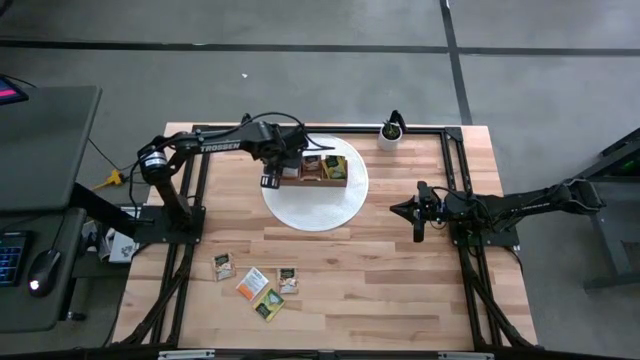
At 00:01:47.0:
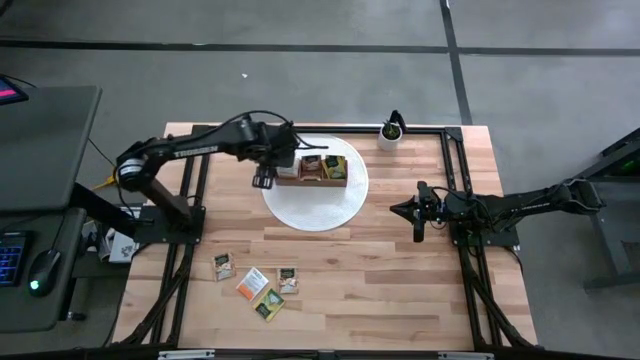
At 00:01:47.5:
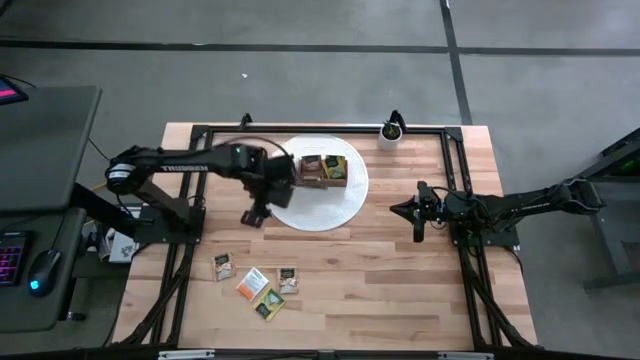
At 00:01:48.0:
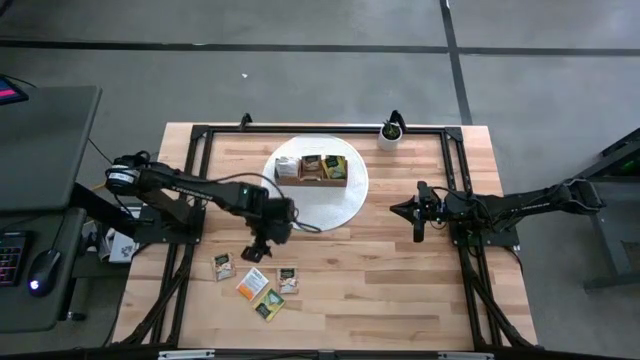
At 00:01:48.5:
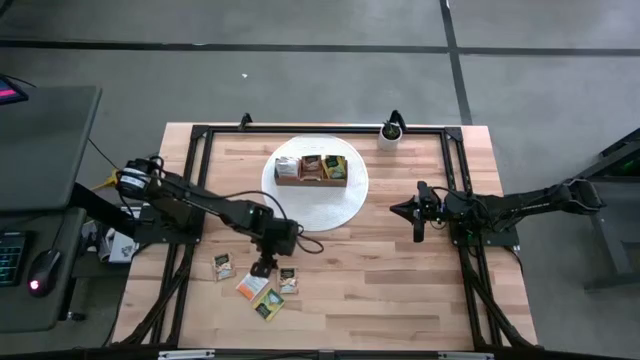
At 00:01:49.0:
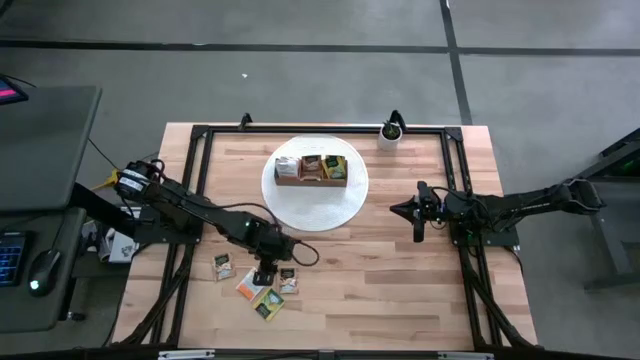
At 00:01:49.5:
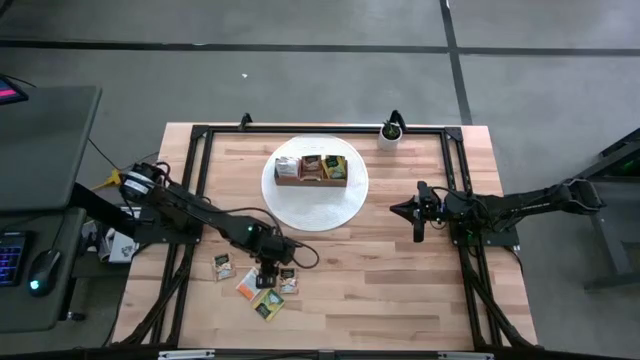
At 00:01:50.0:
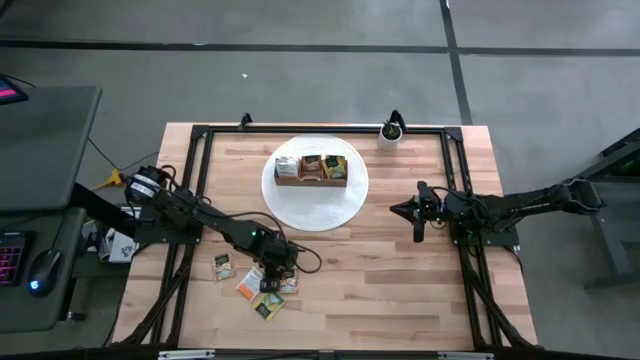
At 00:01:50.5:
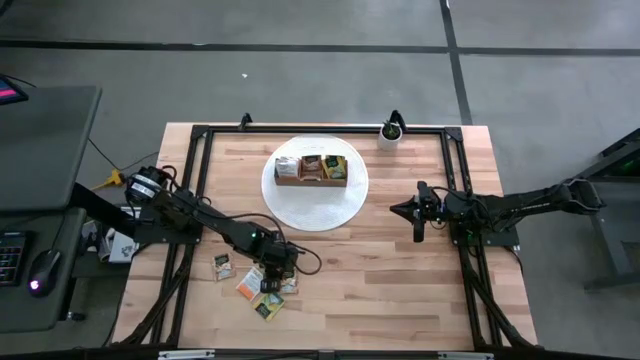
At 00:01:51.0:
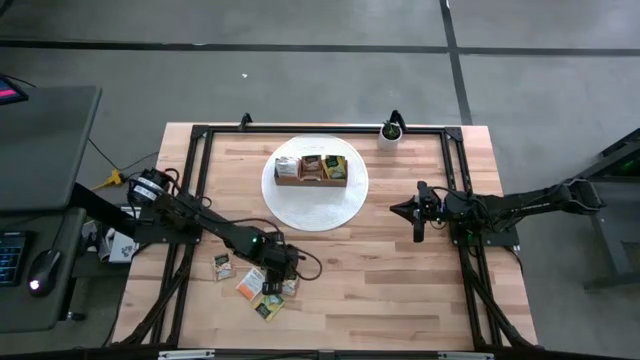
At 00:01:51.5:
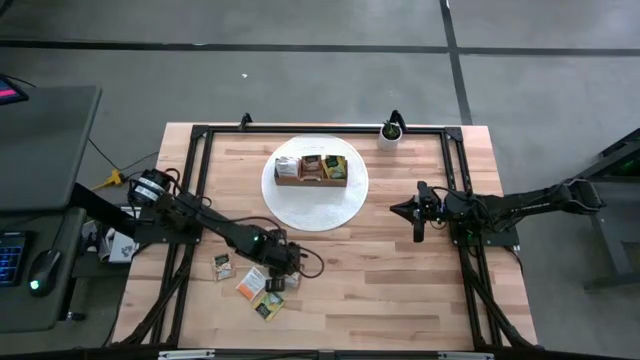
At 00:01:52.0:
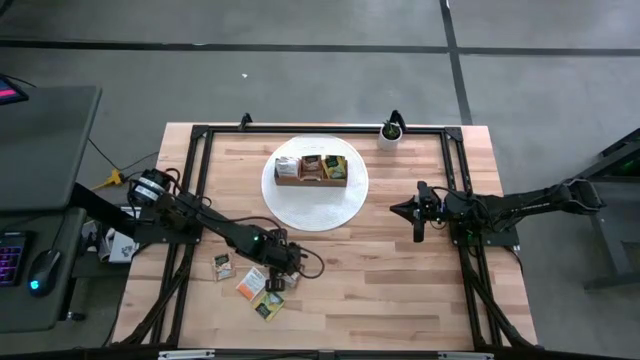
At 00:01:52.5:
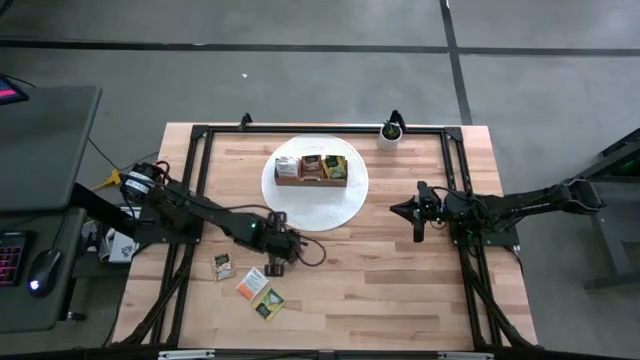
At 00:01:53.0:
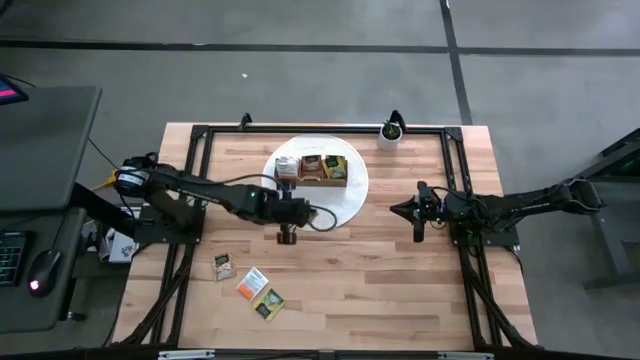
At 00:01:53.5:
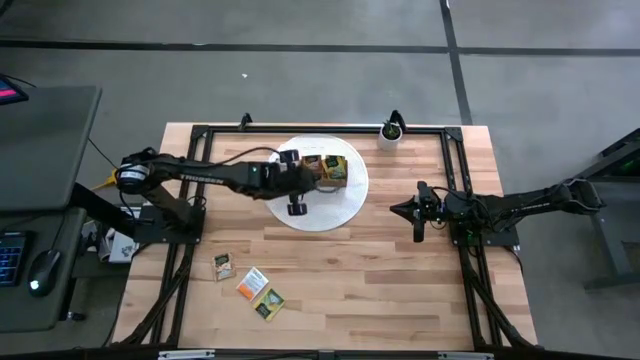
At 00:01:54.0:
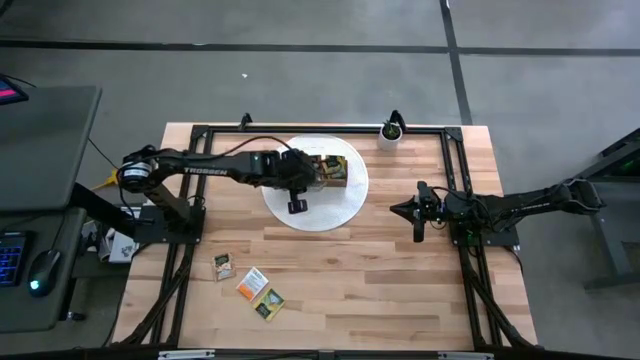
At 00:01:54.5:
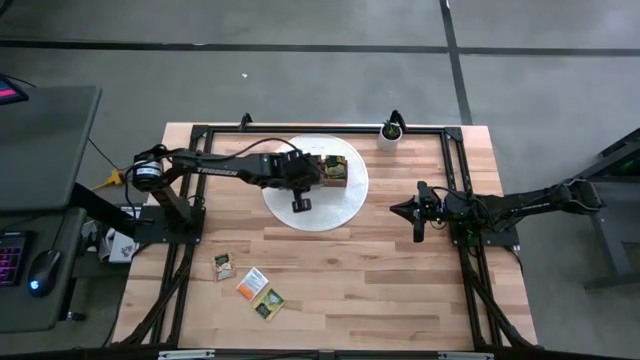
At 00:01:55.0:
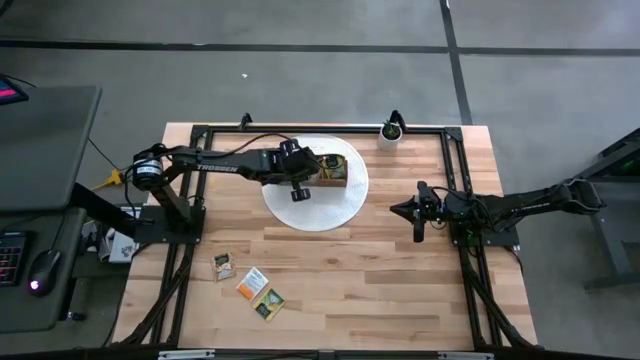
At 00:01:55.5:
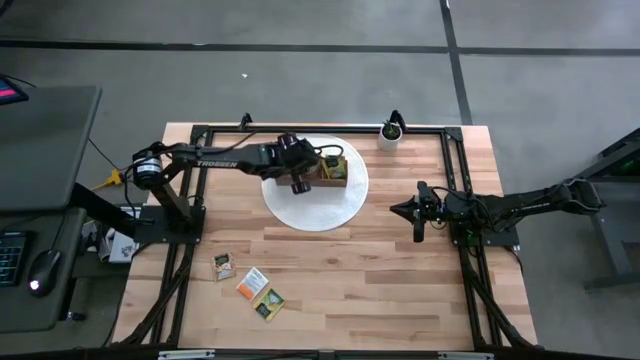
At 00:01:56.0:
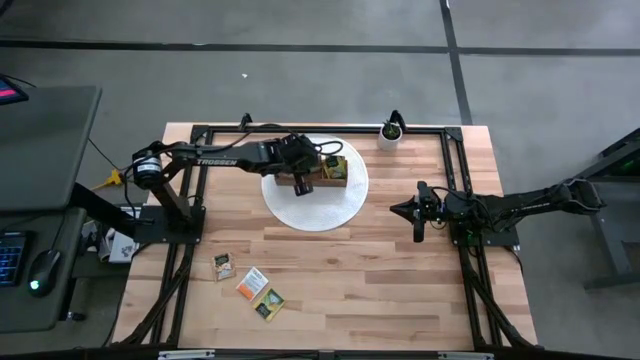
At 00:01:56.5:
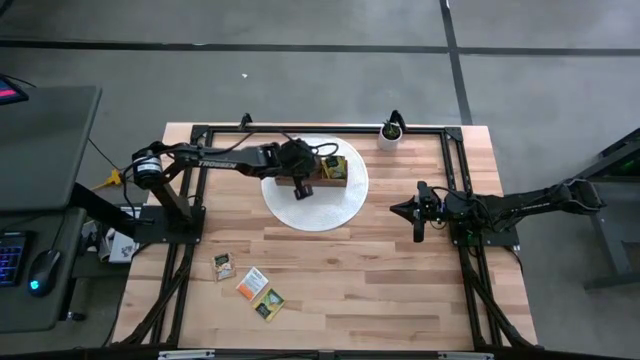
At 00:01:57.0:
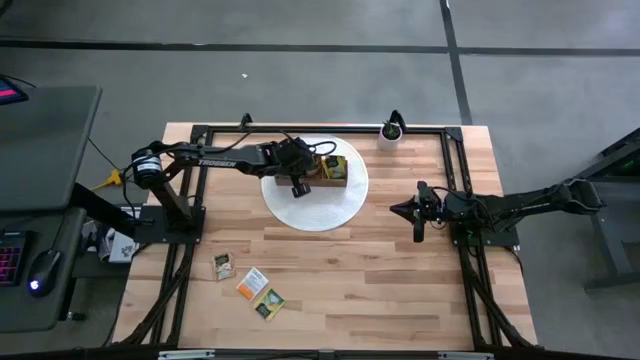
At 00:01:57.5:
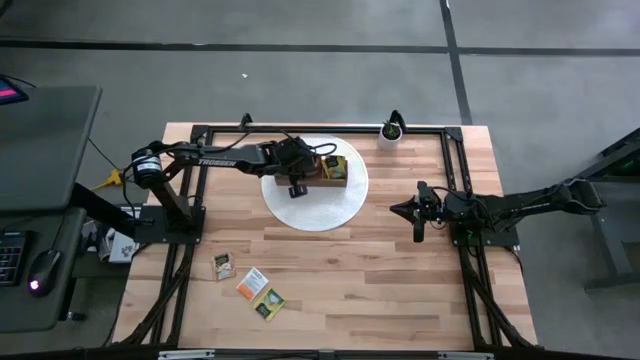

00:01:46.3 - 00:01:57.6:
Task: Pick & Place Tea
Put the brown tea bag into the middle section of the wooden organizer

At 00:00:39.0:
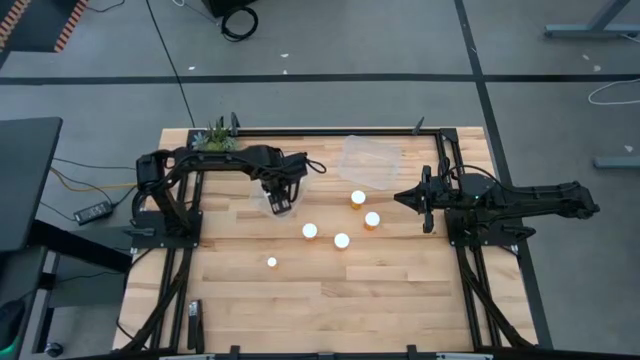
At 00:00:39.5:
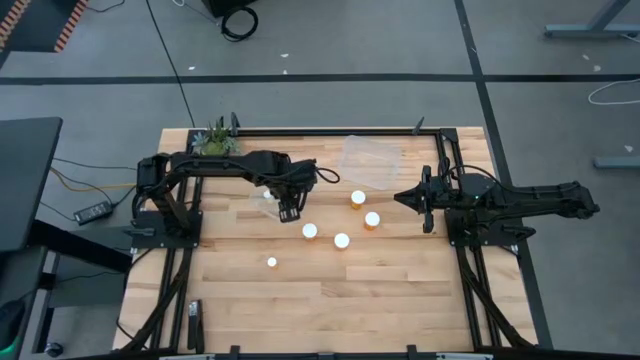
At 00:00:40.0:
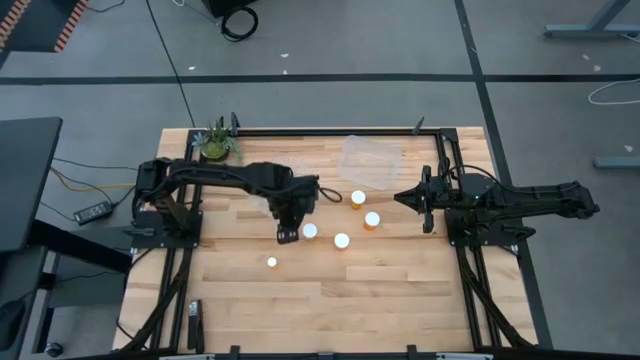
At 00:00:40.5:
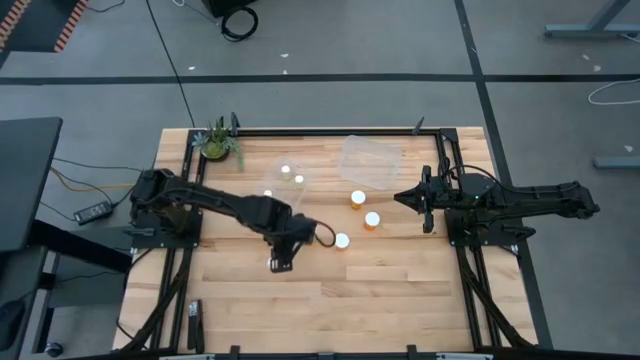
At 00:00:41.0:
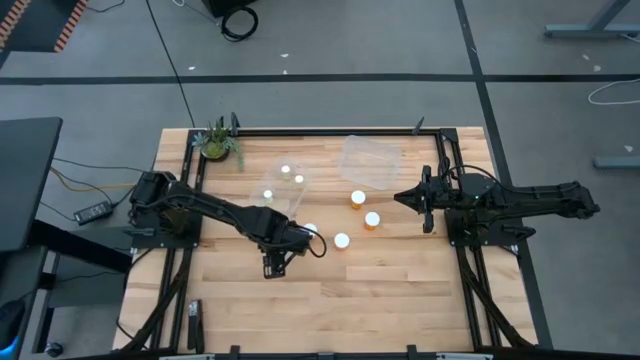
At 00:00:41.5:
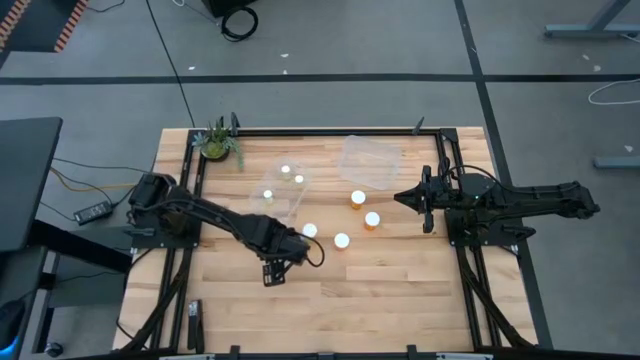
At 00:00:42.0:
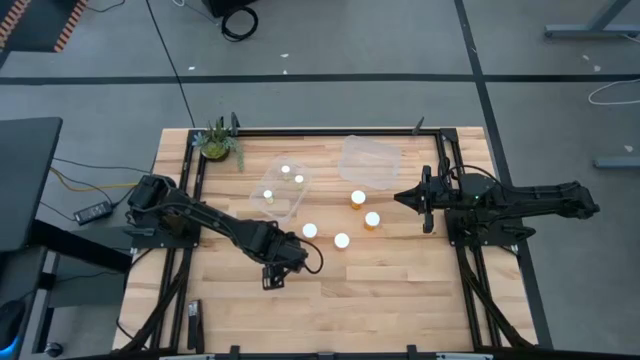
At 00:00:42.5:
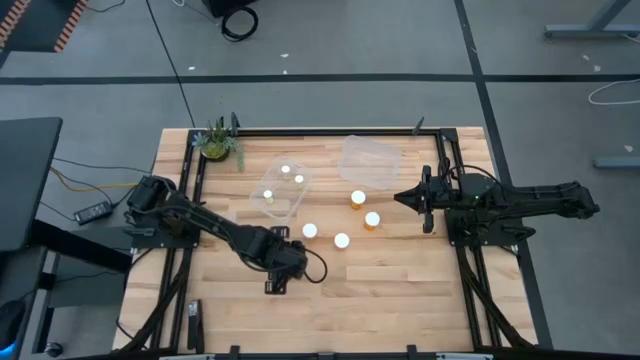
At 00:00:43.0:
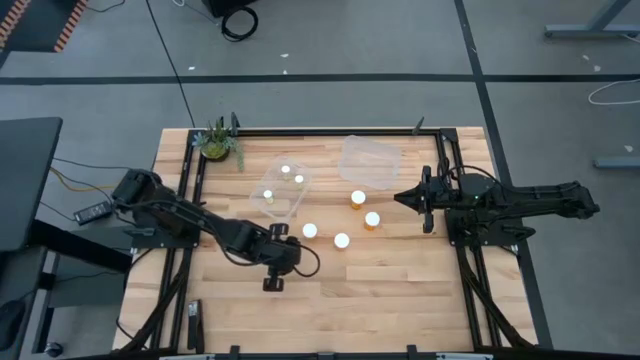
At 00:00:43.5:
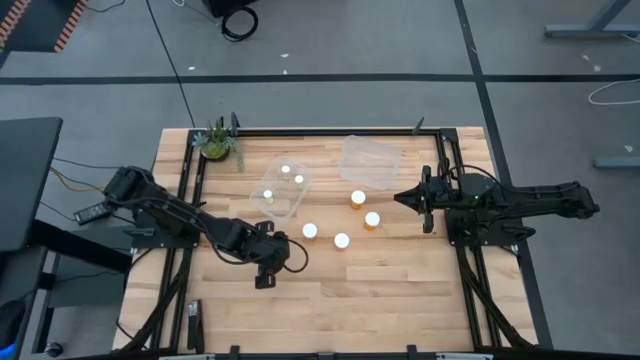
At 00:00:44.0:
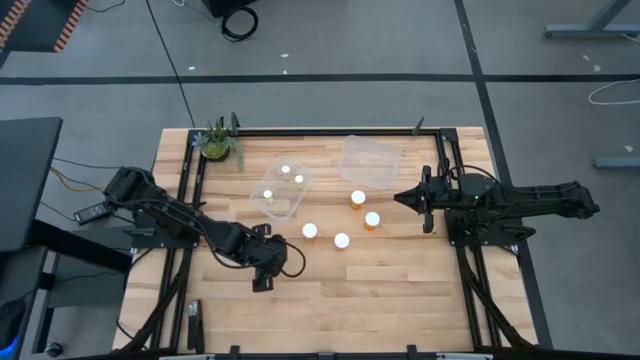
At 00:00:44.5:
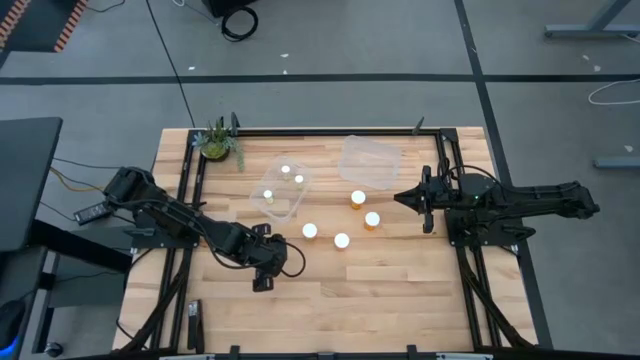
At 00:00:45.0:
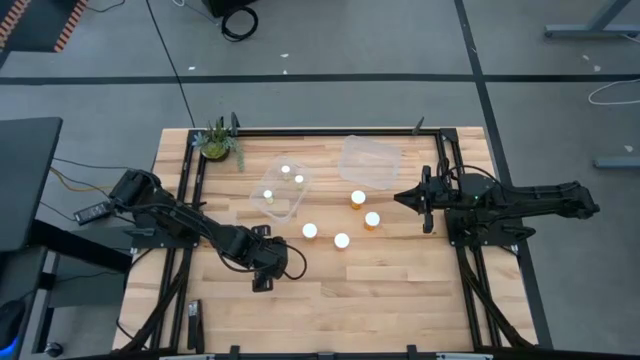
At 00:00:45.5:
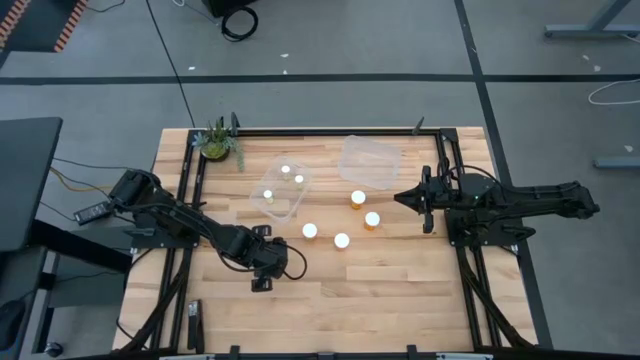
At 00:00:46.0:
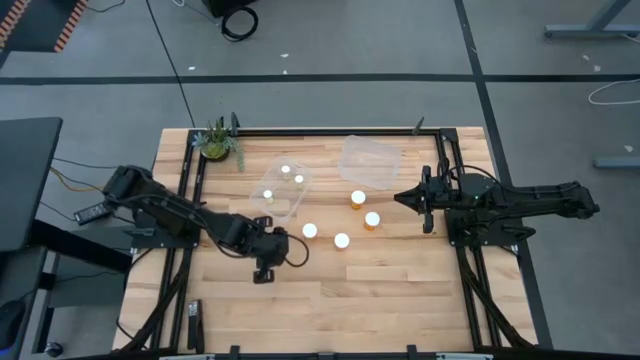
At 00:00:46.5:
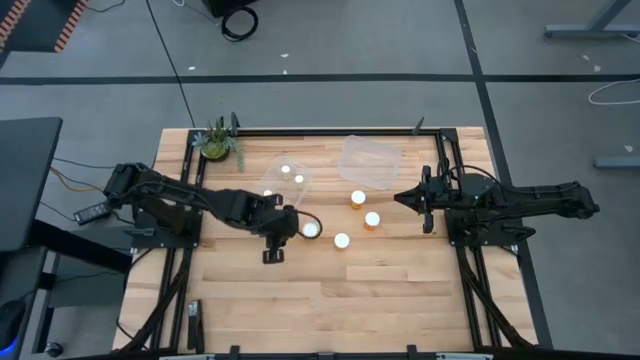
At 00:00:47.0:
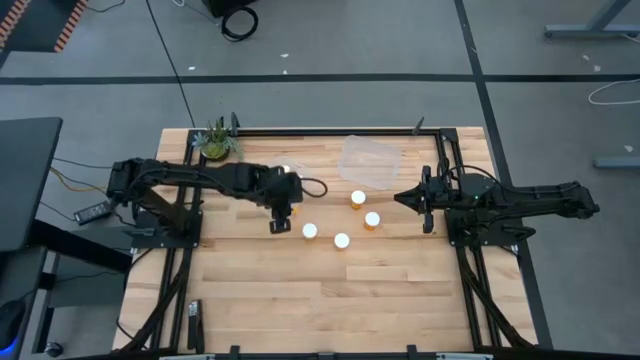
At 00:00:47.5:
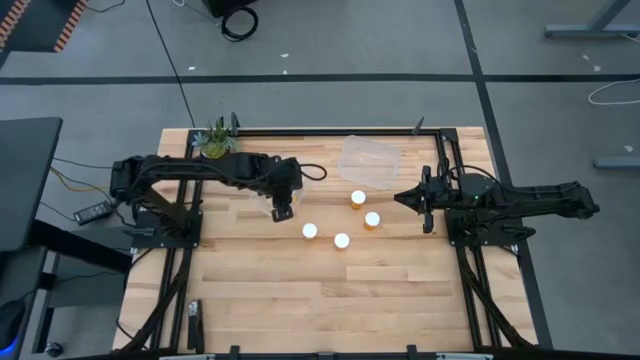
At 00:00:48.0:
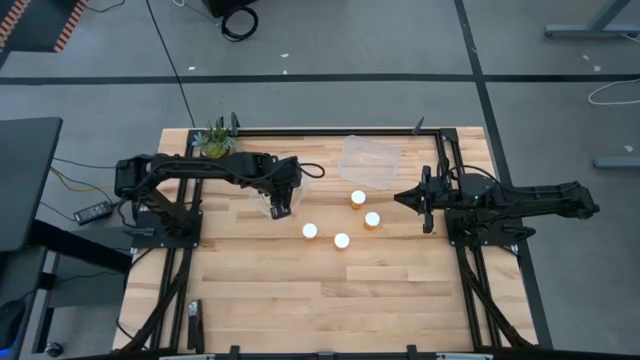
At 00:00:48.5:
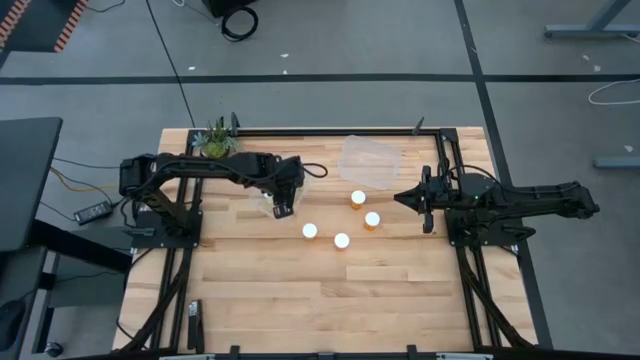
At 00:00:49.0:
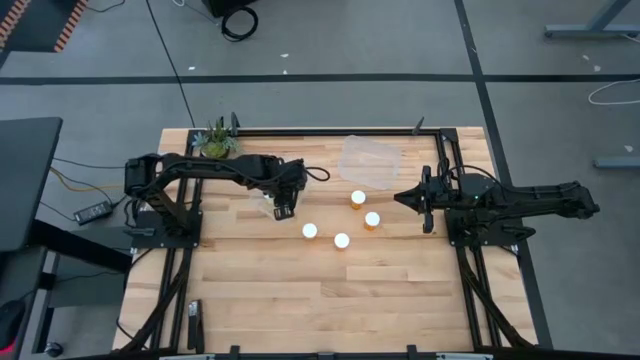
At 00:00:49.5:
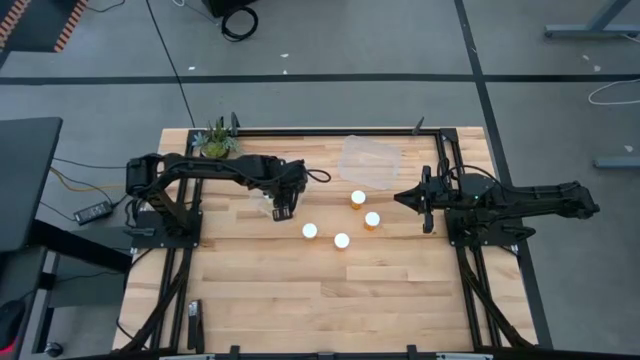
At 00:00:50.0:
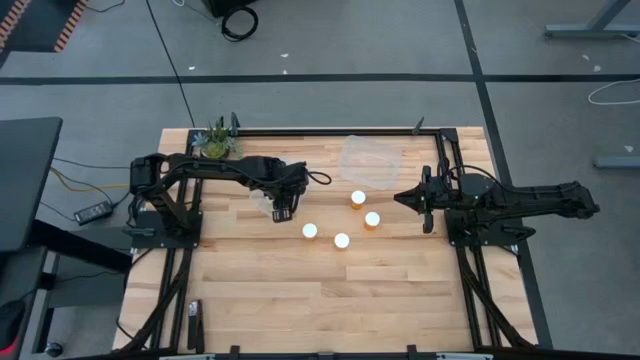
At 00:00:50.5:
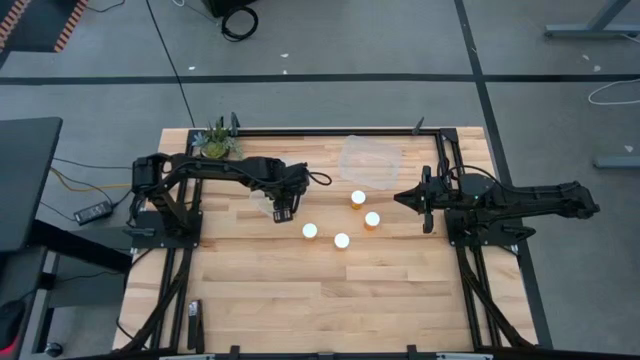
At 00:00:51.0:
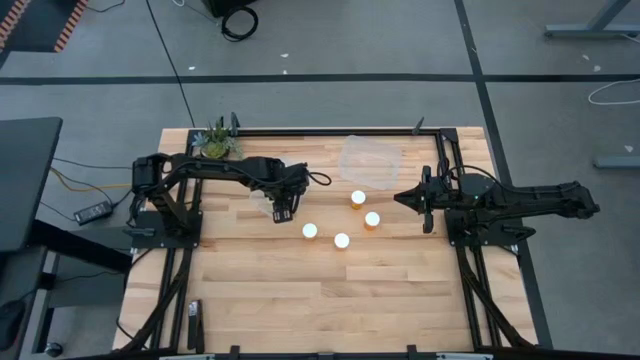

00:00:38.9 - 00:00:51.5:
Task: Pick and place medicine bottles into bin by pill shape (circle, oval)
Put the small orange pill bottle into the left transparent bin
